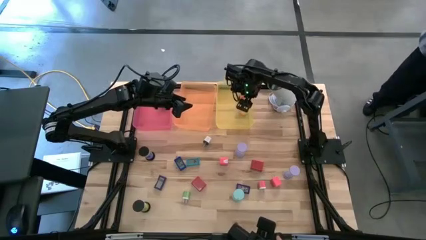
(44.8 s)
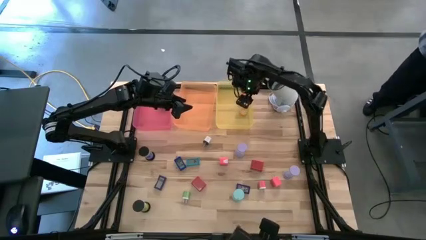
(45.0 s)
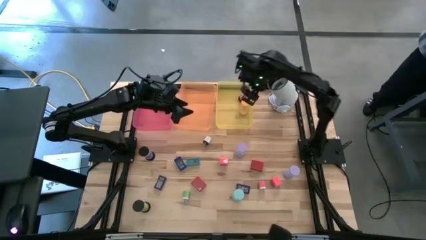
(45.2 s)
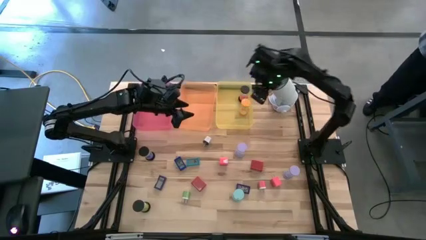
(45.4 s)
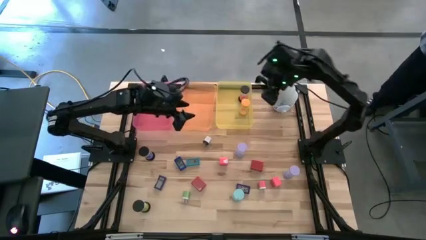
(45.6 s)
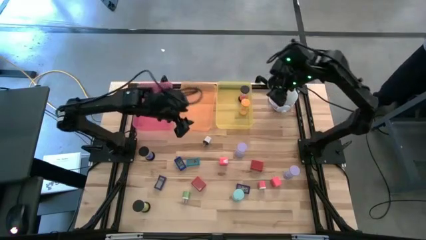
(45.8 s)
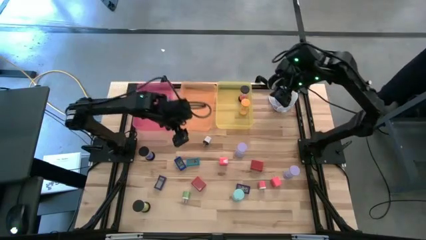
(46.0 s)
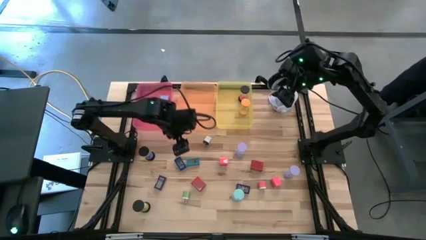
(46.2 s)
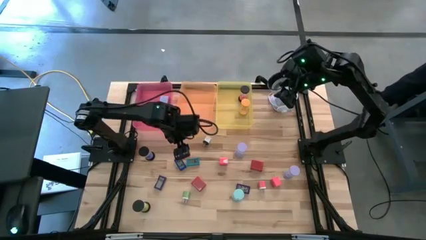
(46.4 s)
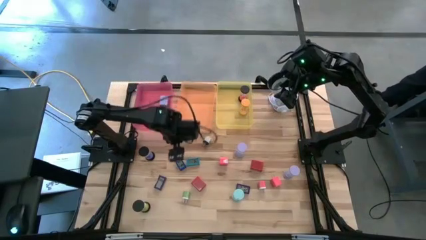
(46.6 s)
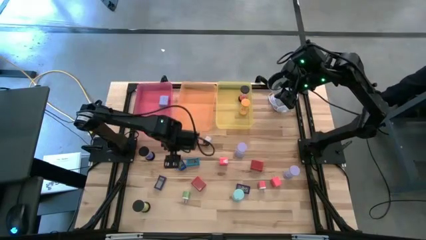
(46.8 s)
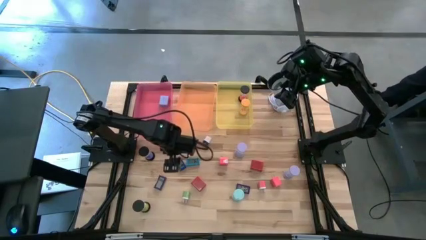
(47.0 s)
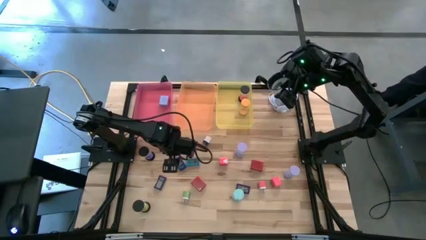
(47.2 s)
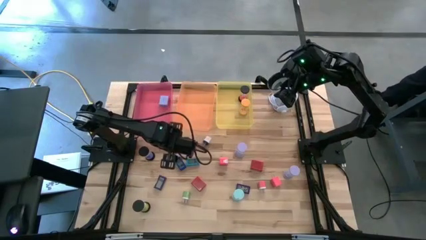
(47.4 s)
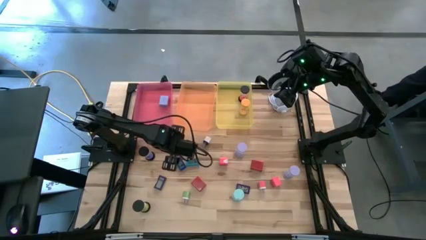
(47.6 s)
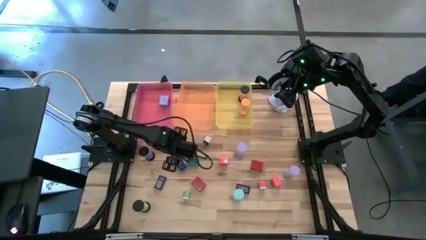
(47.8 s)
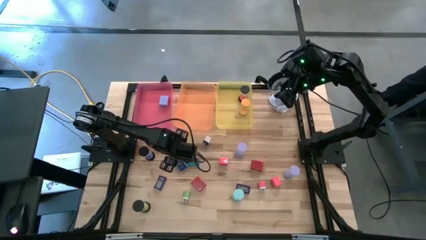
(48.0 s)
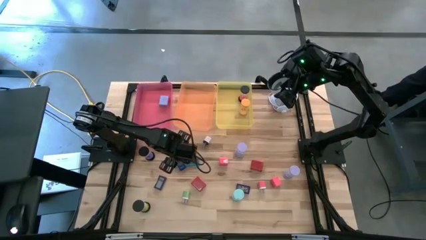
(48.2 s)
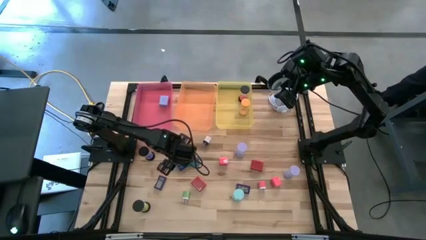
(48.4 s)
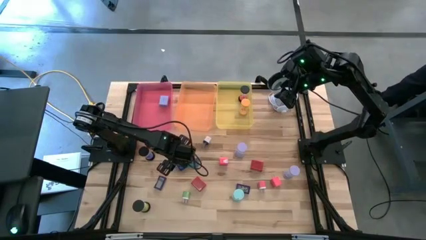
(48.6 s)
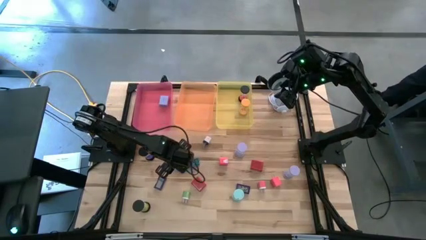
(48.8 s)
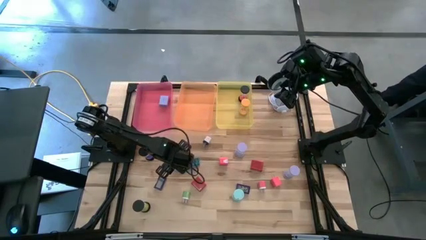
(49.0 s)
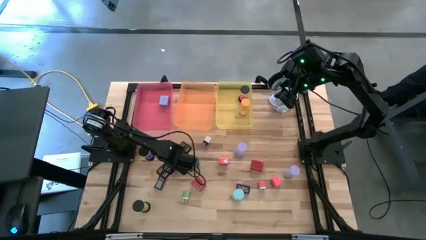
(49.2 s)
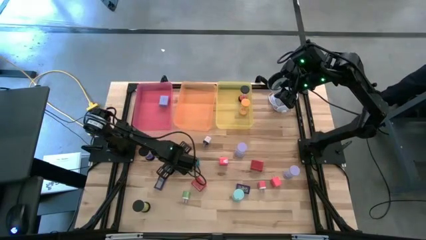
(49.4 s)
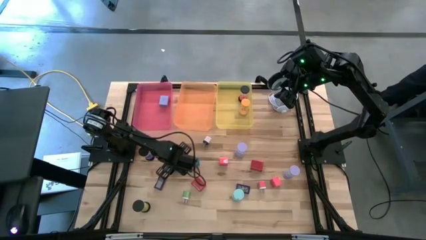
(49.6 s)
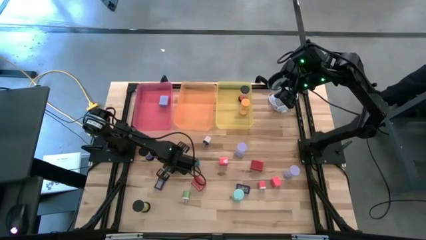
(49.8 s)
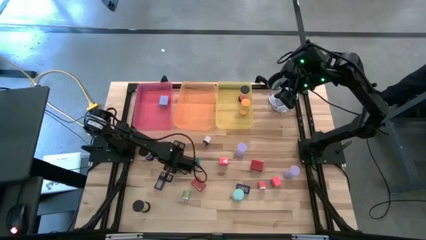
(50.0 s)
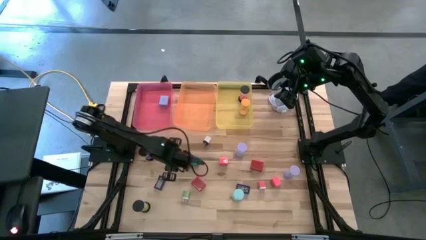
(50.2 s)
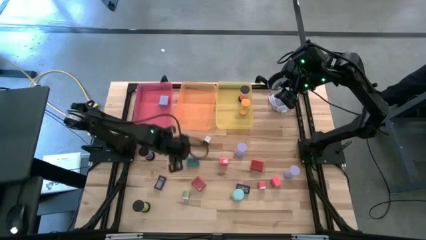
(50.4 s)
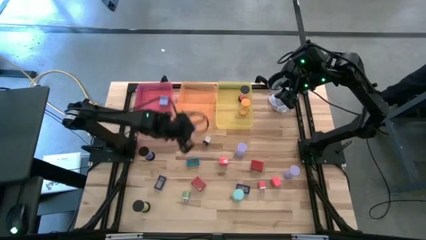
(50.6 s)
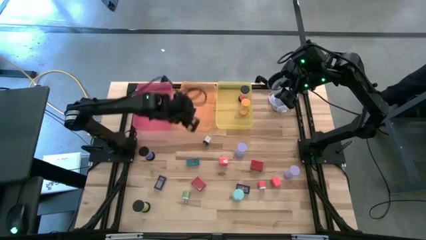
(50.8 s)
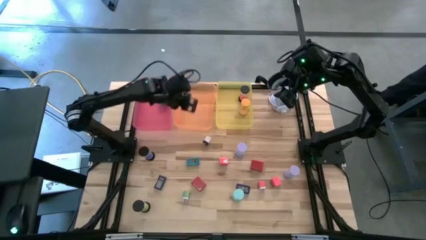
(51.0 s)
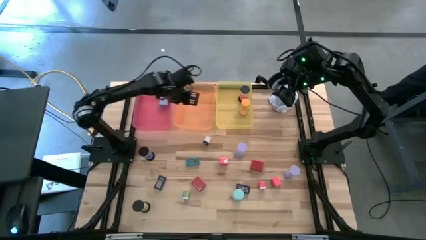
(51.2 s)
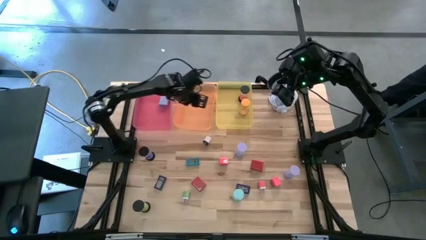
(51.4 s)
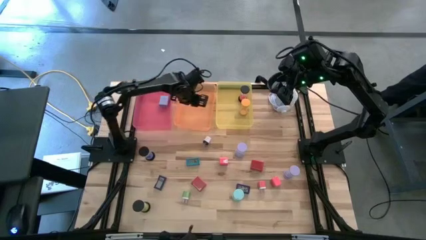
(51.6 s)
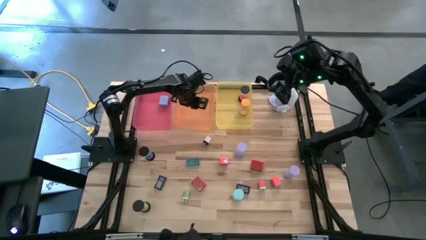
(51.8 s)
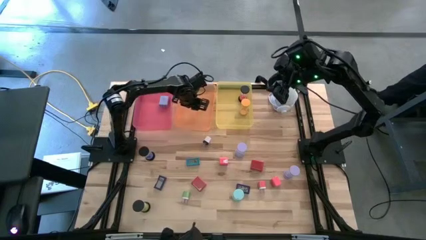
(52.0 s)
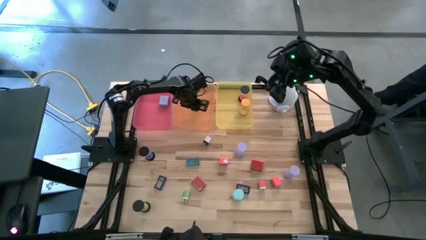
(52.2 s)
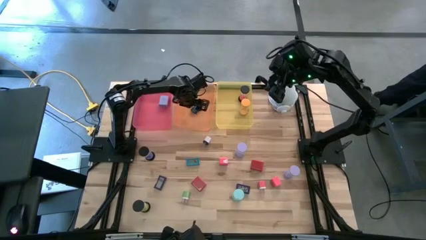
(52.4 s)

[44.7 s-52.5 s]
Task: Pick & Place Office items
Put the blue digital clock into the orange bin

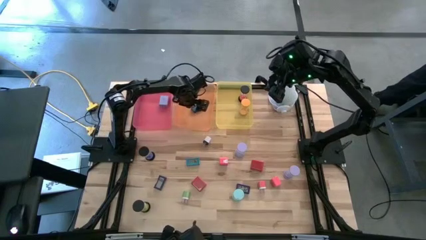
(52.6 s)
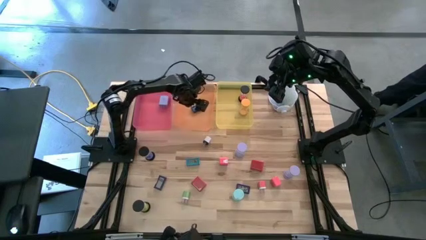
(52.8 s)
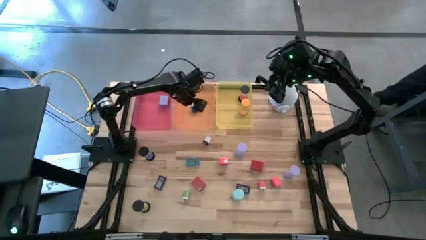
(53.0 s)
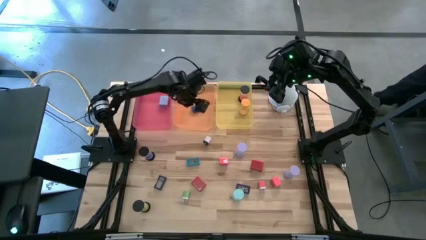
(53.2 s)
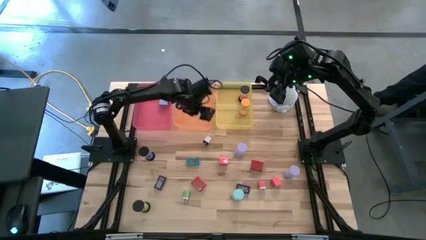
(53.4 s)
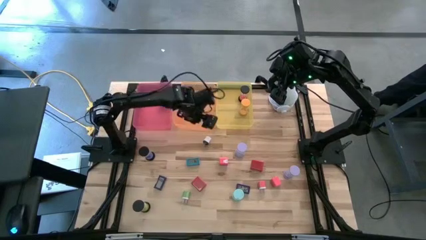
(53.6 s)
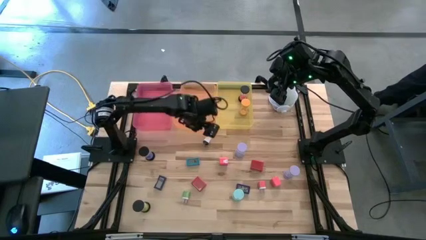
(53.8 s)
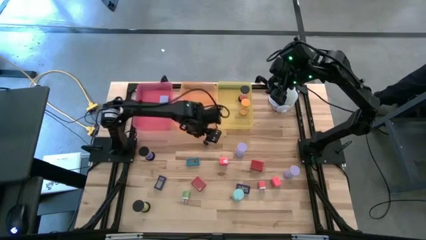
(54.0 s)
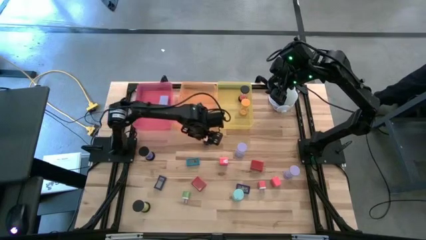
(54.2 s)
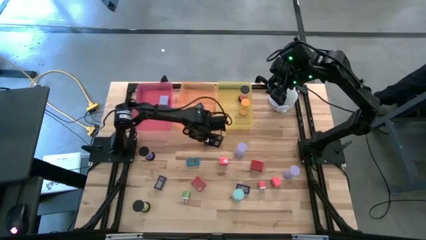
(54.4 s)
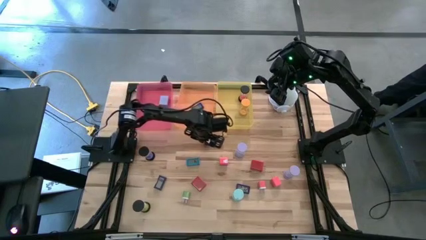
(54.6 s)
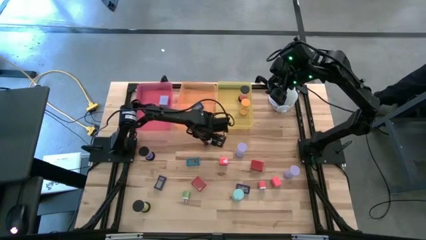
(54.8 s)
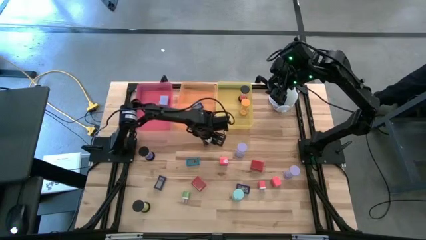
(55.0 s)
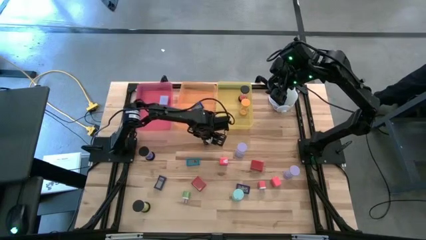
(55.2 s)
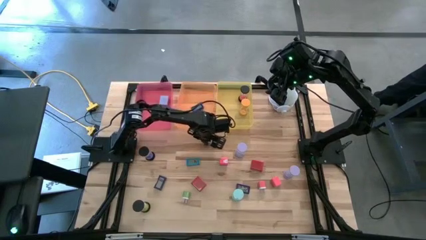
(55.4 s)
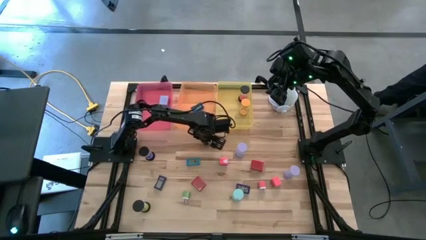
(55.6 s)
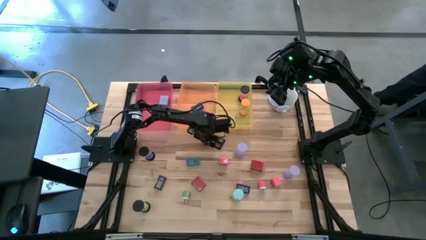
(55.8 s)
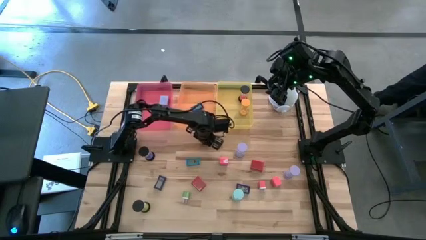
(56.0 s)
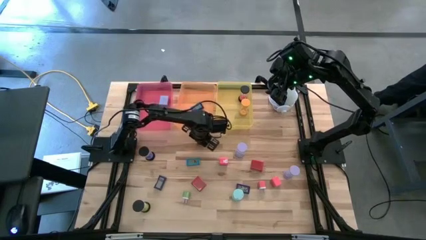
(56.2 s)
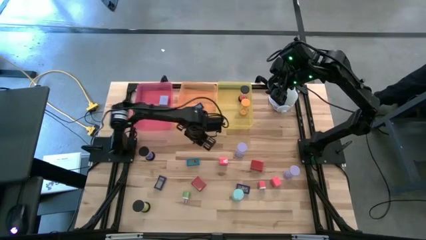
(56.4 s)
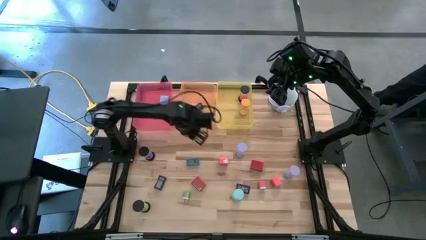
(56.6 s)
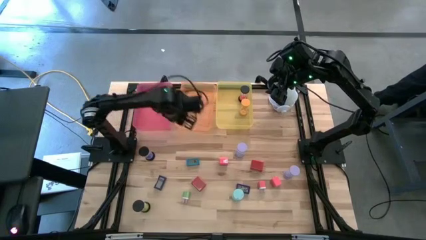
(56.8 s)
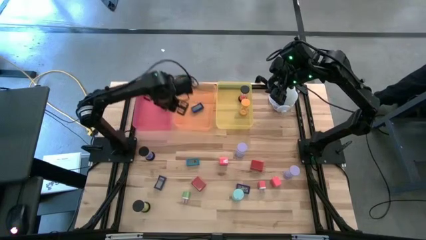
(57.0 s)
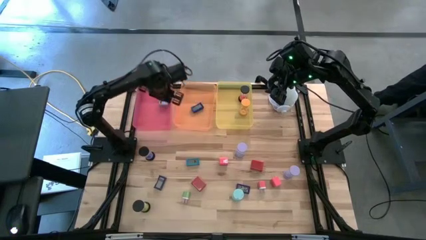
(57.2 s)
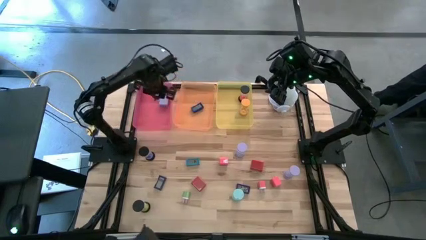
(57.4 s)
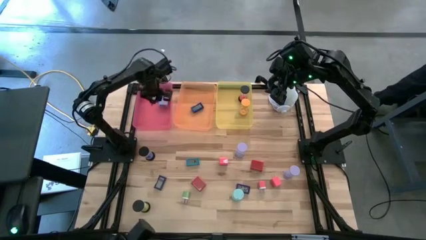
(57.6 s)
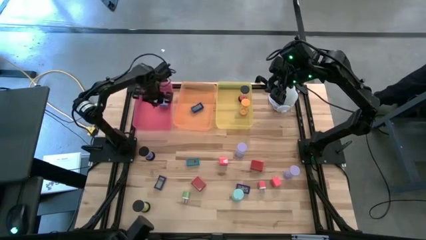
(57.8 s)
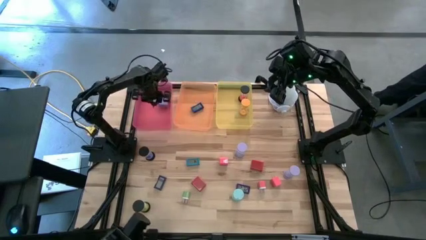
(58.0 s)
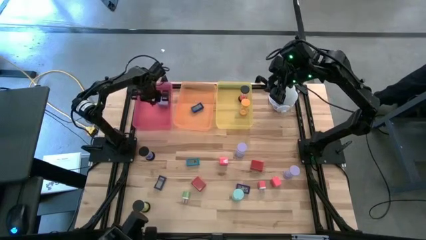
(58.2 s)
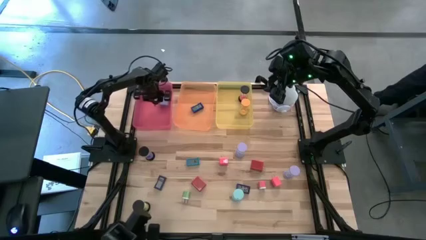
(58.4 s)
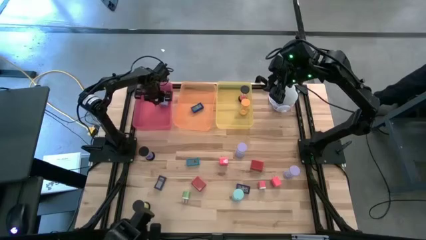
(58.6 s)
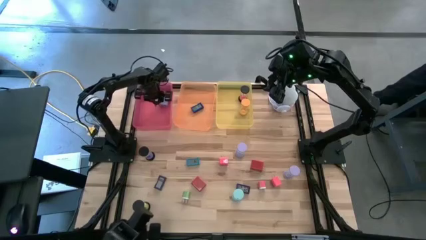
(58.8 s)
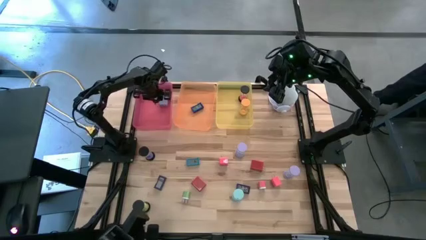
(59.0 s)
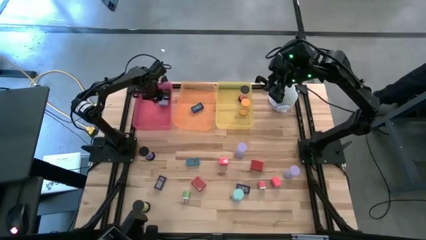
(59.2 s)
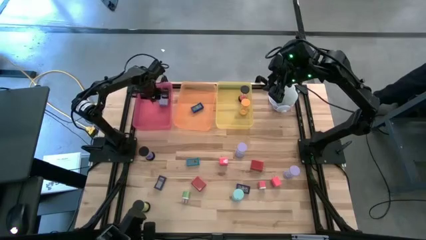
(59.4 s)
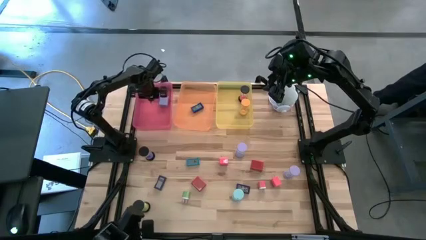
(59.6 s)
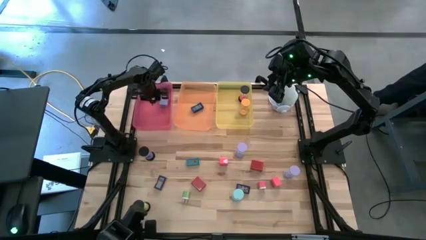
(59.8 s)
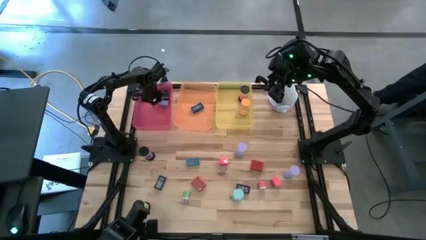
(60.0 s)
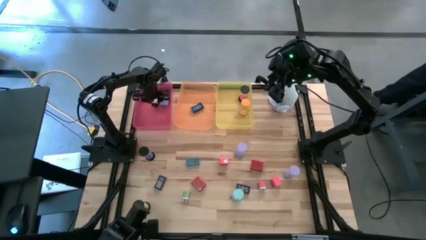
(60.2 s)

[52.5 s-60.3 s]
Put the white black charger adapter into the red bin

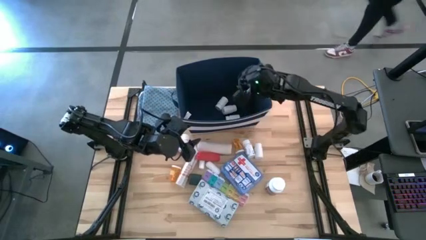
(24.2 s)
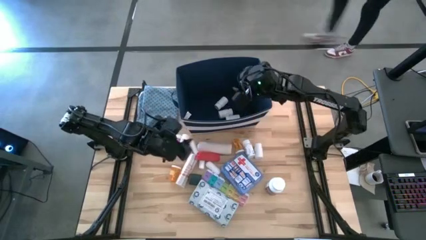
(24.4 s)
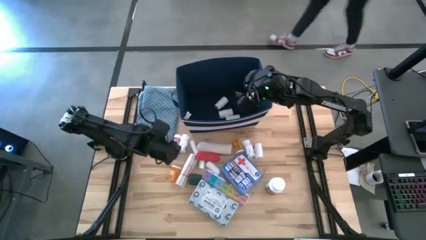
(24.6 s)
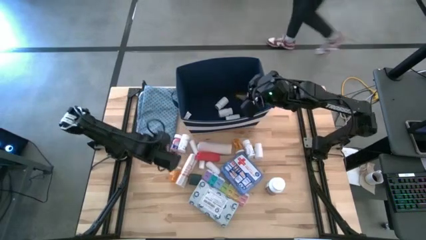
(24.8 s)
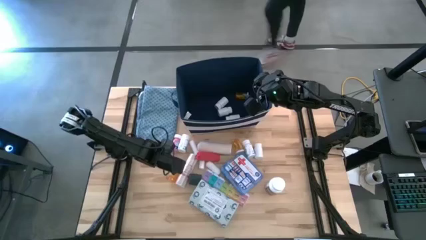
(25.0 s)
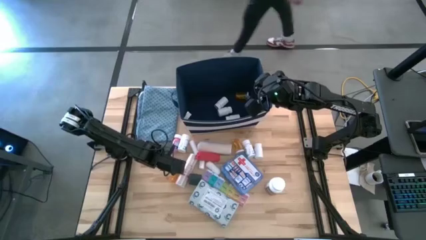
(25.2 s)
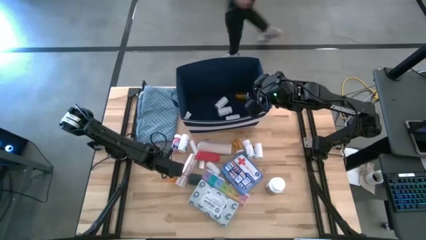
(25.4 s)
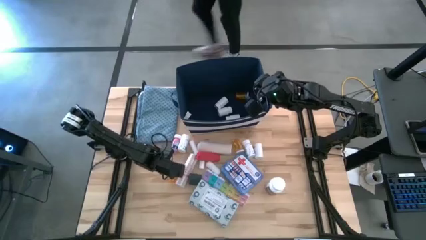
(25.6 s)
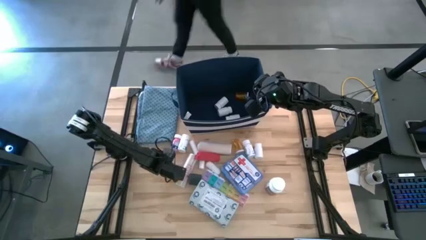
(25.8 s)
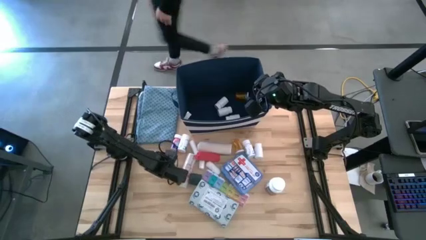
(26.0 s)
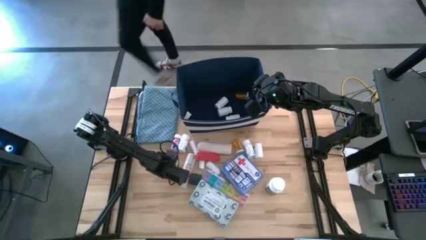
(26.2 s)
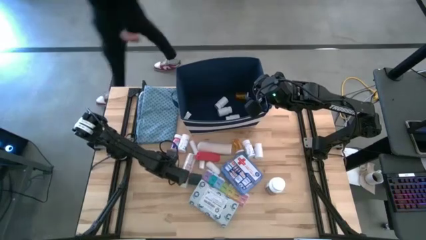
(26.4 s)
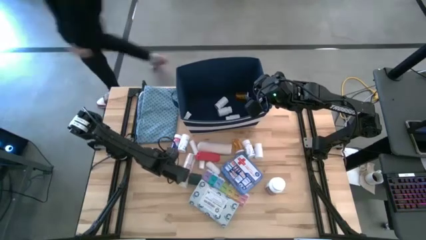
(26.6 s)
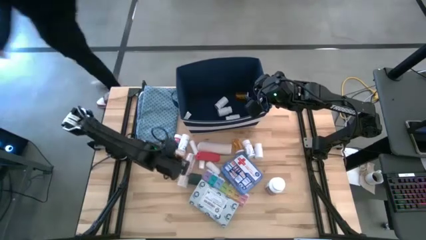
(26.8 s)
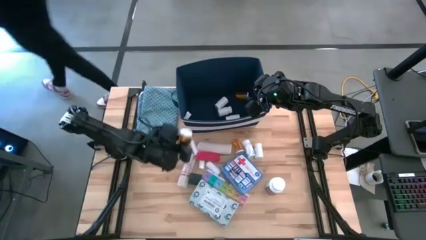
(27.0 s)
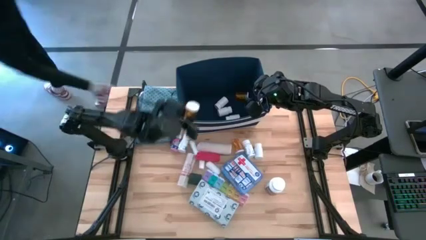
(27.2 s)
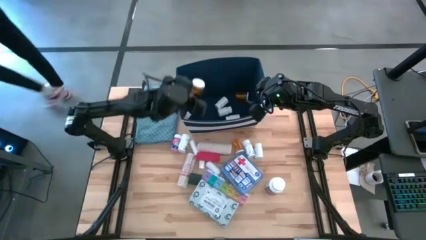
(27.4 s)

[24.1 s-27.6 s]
Task: Pick & place medical supplies in basket/bin
Put the orange pill bottle into the blue bin
